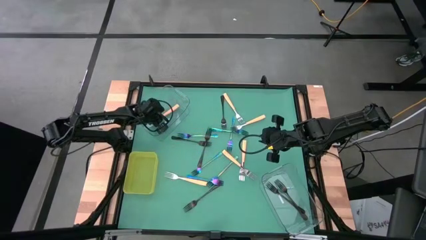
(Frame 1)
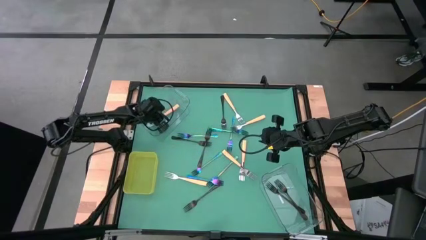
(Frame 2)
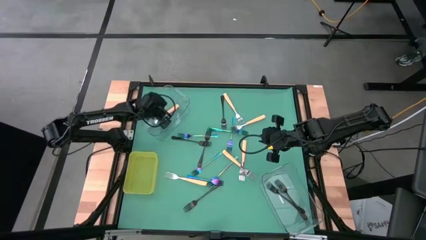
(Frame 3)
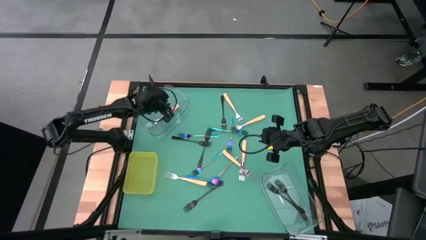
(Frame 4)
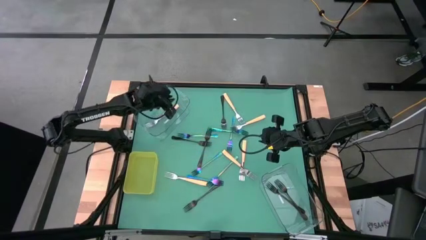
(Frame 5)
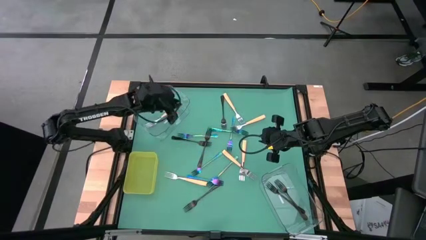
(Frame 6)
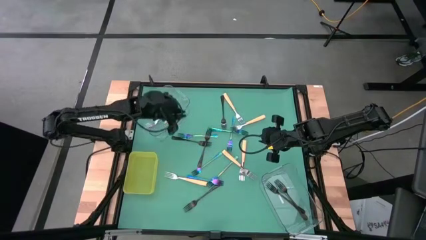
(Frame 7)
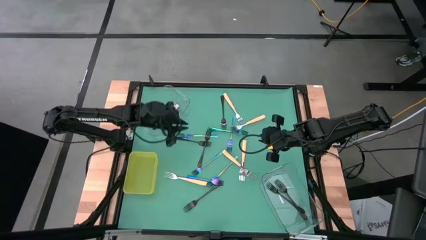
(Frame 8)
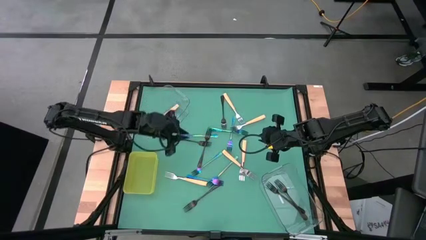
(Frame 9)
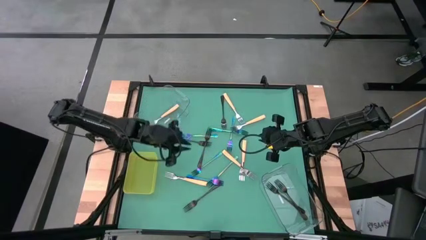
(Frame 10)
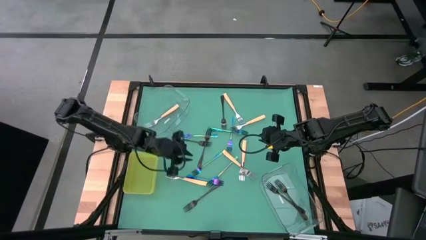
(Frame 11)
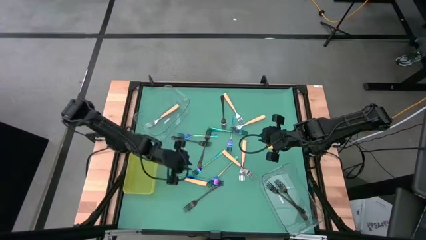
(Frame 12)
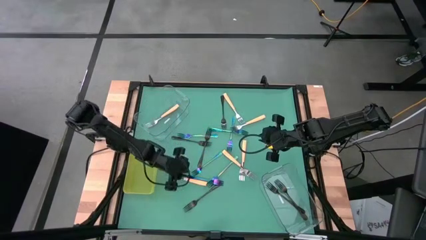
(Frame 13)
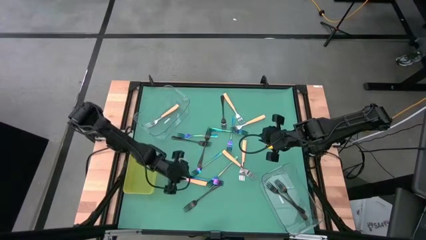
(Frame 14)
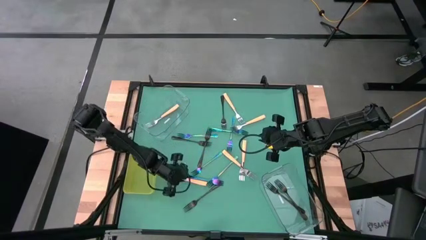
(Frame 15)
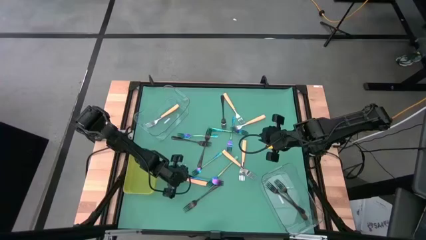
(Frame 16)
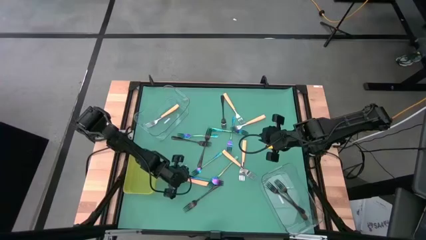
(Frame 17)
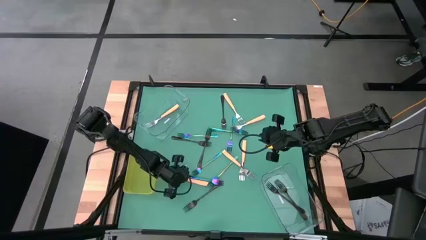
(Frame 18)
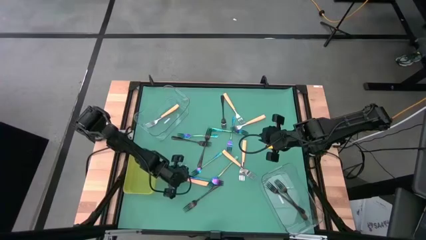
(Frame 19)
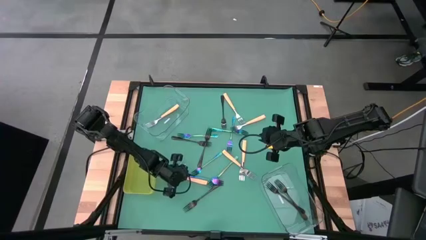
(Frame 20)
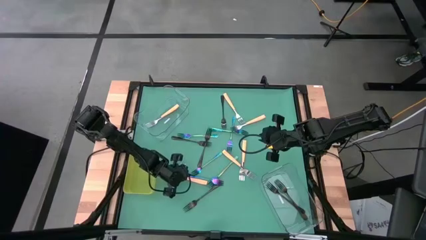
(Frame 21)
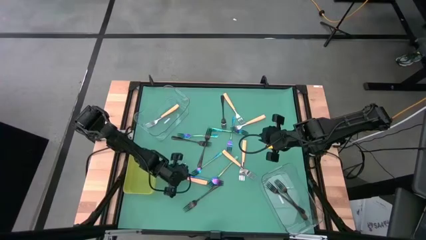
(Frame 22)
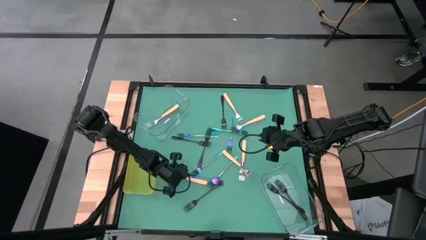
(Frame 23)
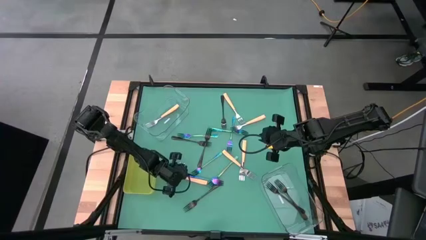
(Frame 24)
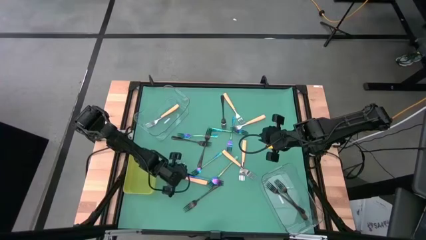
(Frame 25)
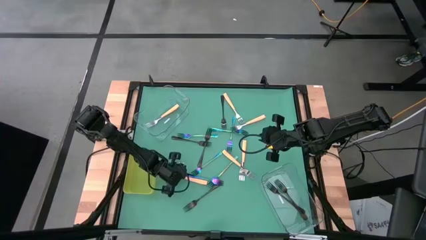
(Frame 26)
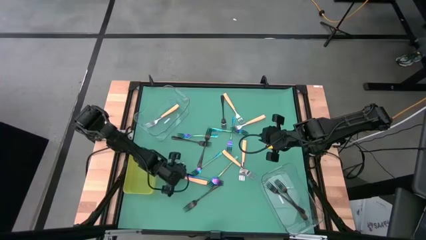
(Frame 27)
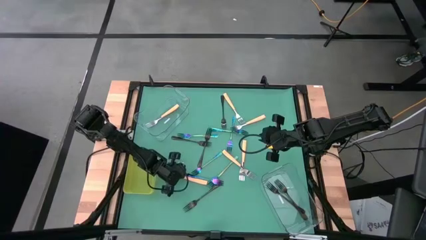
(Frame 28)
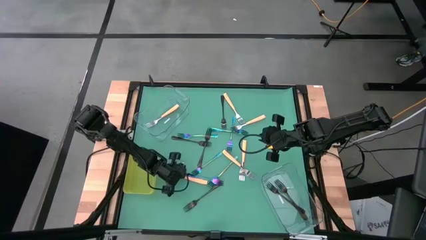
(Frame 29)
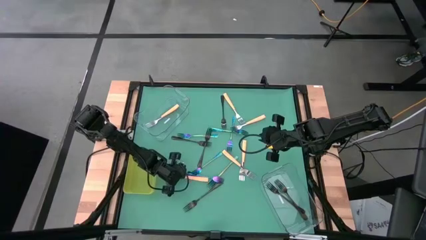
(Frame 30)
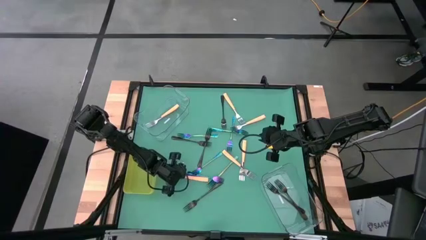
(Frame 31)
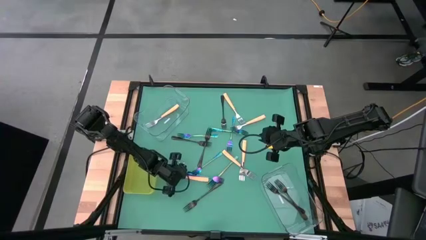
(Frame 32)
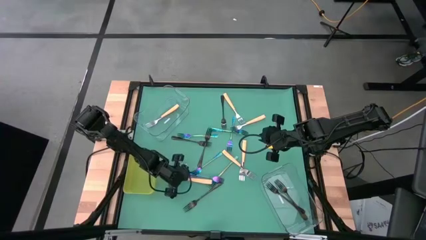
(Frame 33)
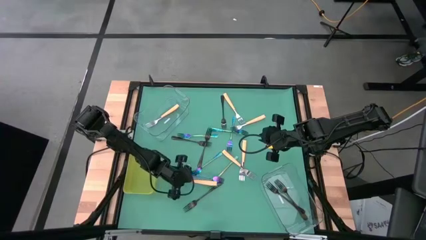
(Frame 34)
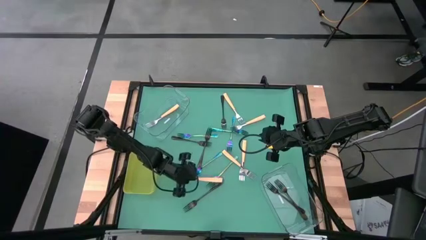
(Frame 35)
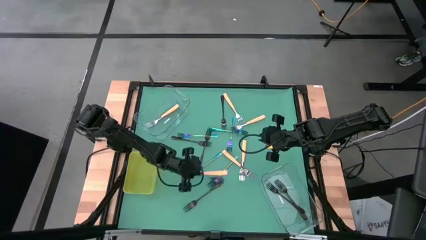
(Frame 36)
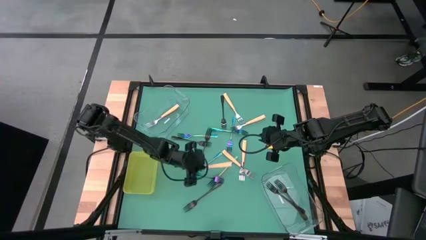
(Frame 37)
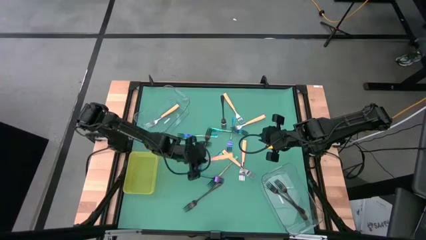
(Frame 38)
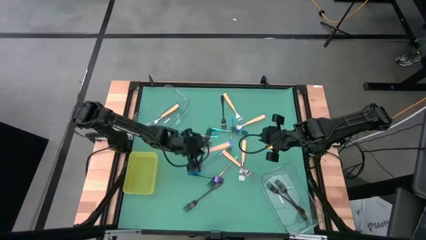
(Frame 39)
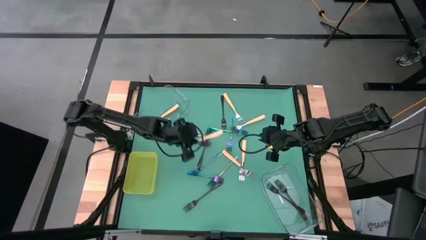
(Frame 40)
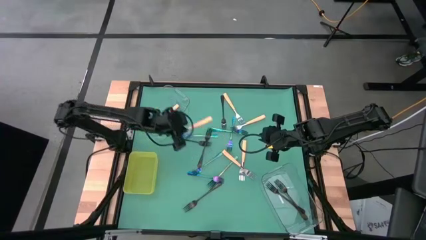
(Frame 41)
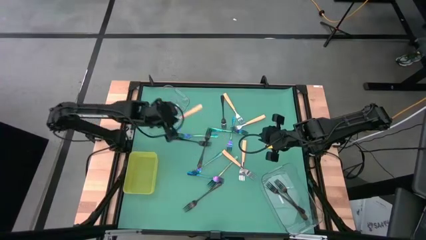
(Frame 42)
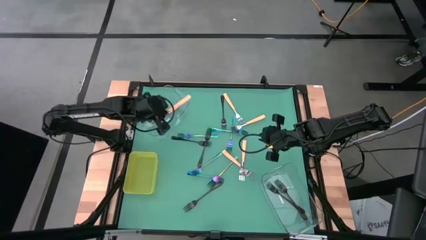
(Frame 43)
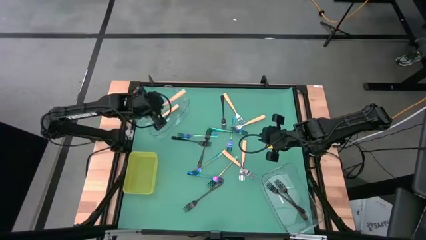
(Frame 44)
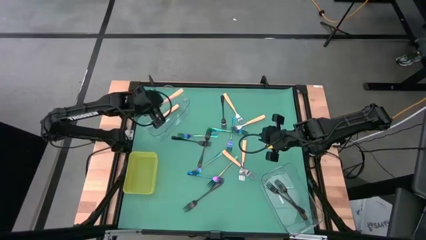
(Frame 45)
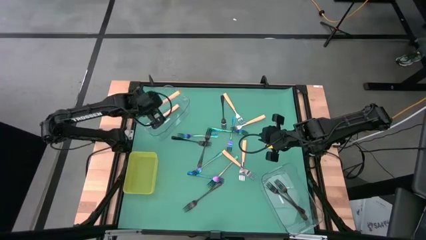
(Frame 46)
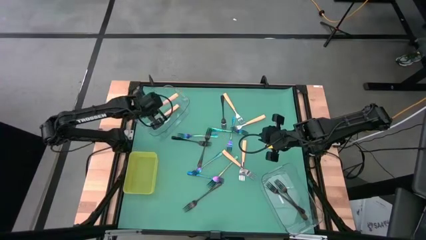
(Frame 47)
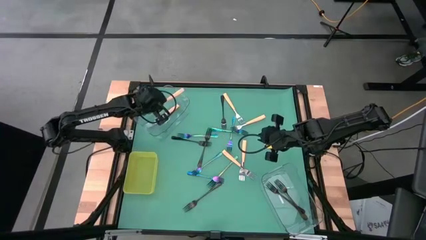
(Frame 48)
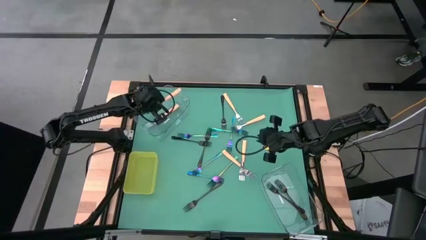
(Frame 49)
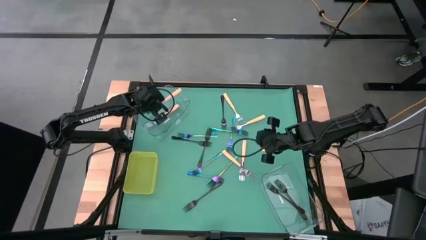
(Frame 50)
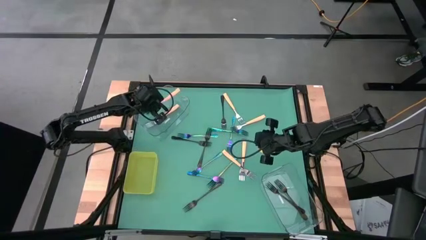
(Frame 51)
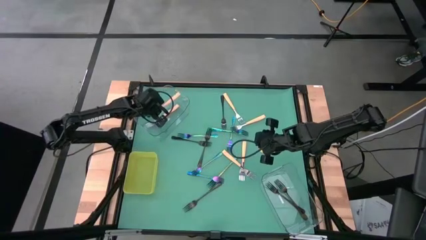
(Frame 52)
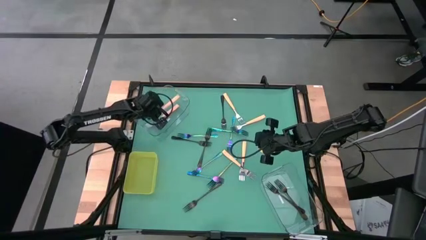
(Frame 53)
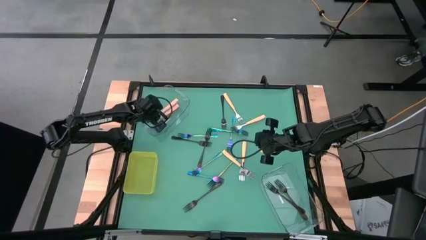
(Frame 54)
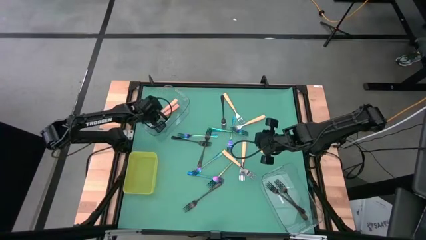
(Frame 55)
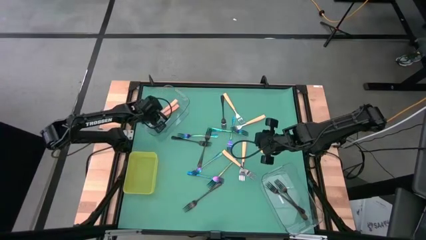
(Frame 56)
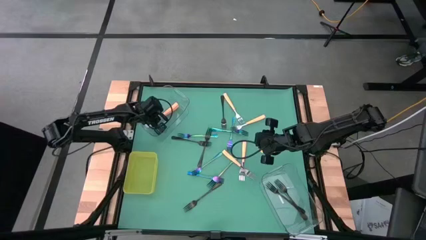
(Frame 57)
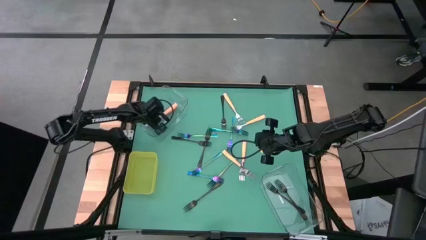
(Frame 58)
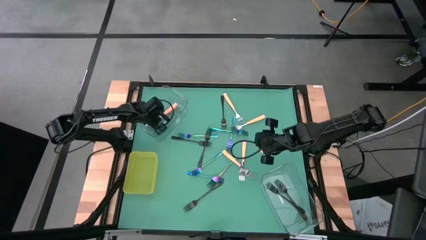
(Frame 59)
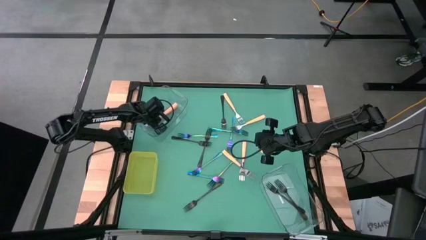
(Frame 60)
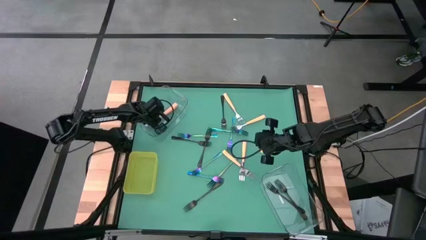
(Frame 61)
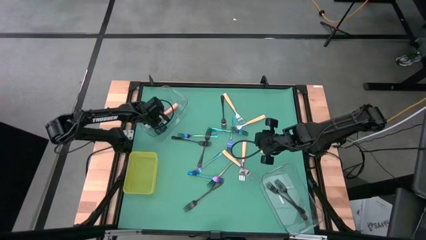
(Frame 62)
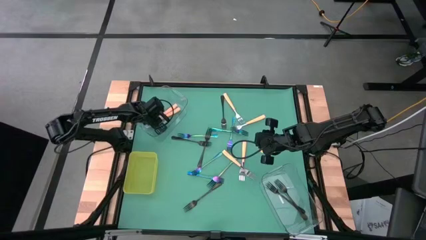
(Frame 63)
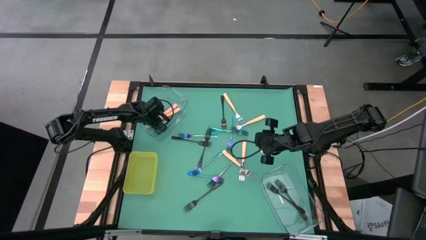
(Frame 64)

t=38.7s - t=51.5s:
Task: Sort silverware by color (type)
Put the orange fork in the top transparent bin
